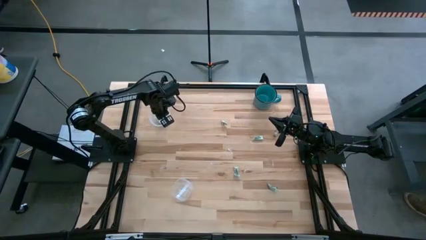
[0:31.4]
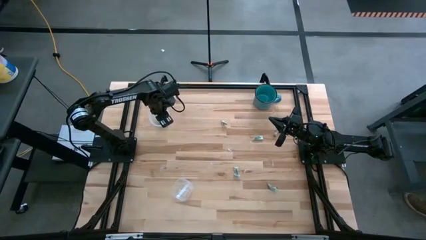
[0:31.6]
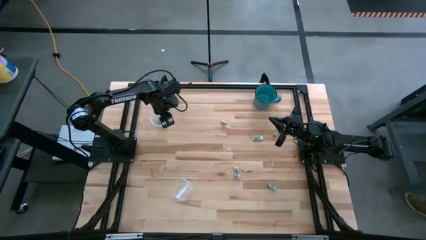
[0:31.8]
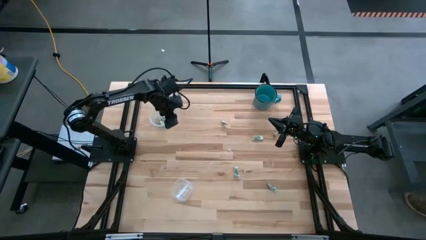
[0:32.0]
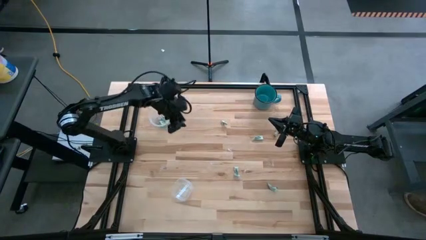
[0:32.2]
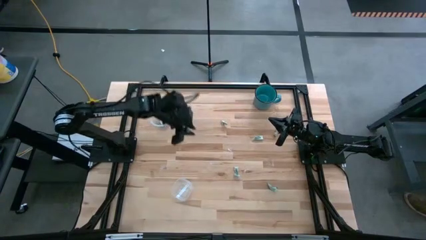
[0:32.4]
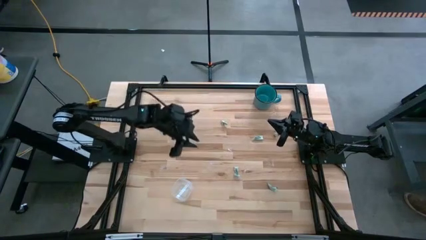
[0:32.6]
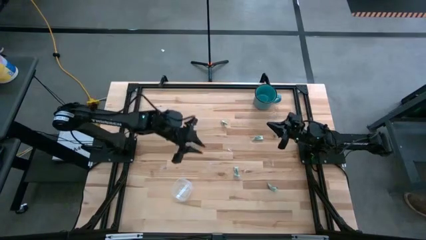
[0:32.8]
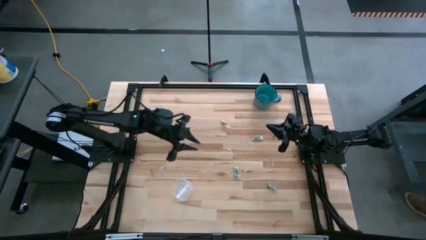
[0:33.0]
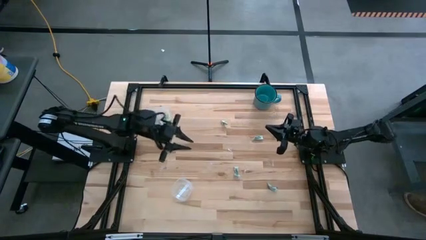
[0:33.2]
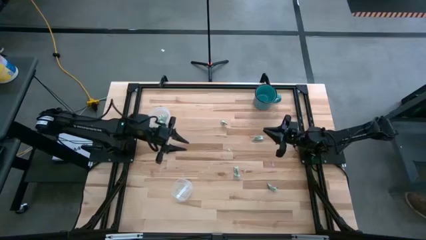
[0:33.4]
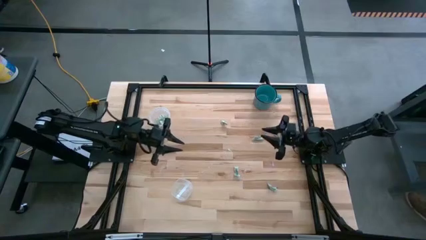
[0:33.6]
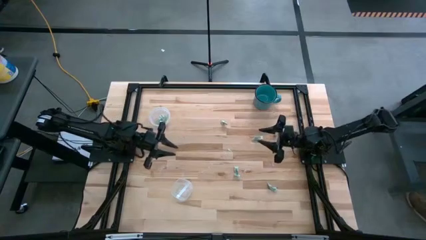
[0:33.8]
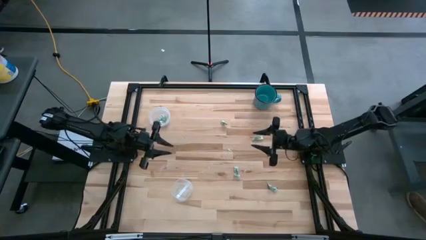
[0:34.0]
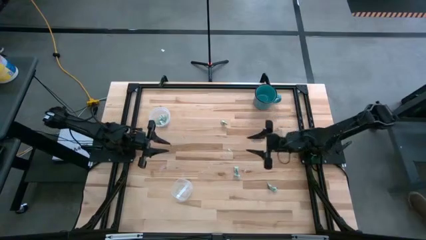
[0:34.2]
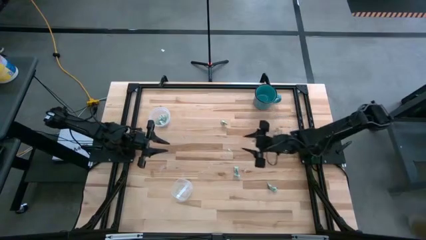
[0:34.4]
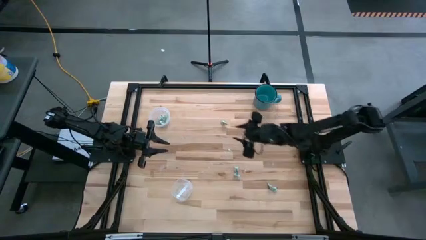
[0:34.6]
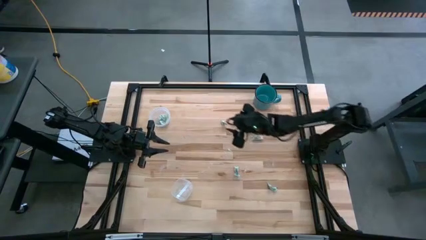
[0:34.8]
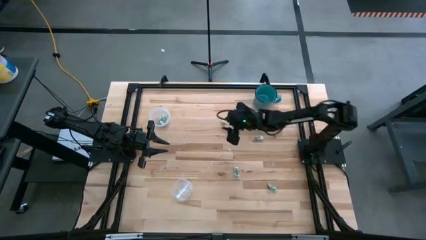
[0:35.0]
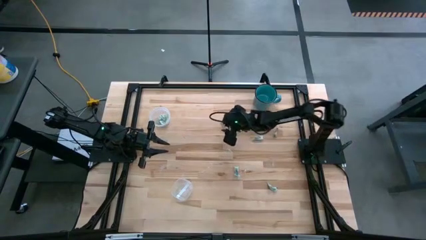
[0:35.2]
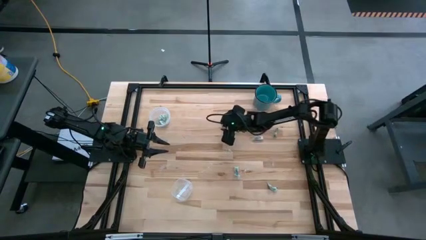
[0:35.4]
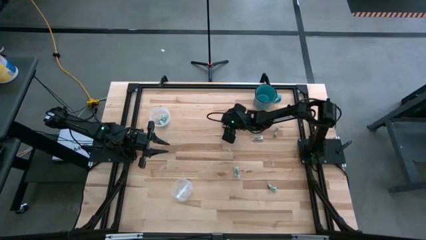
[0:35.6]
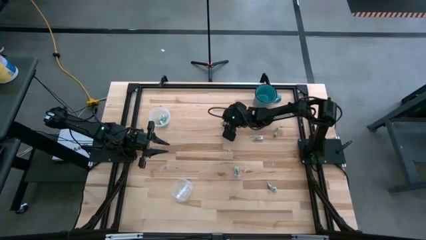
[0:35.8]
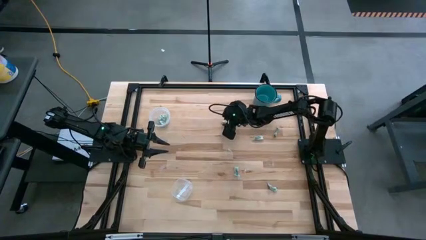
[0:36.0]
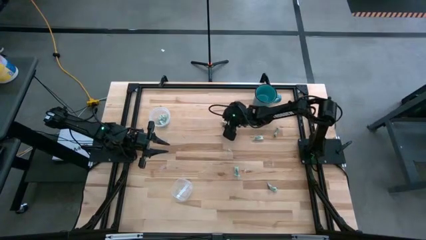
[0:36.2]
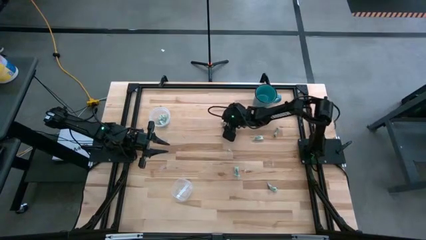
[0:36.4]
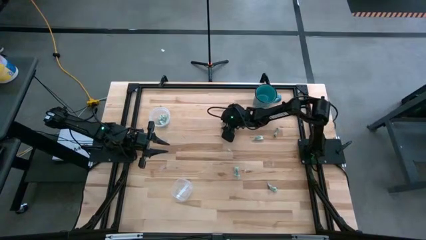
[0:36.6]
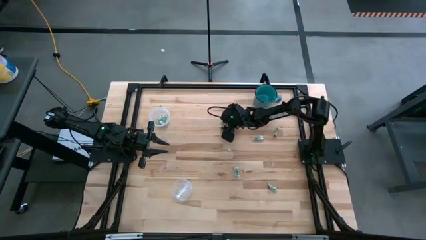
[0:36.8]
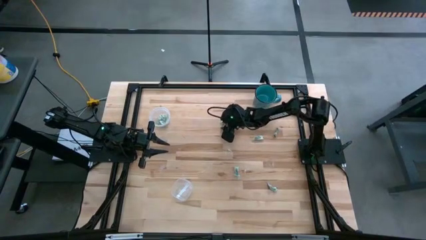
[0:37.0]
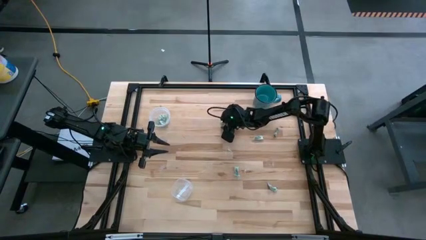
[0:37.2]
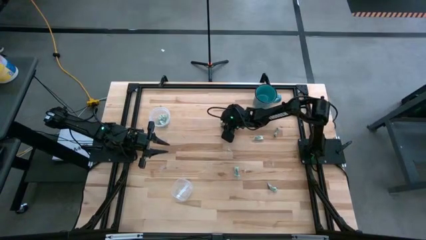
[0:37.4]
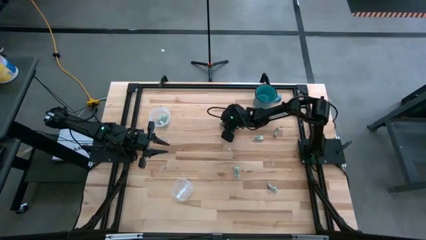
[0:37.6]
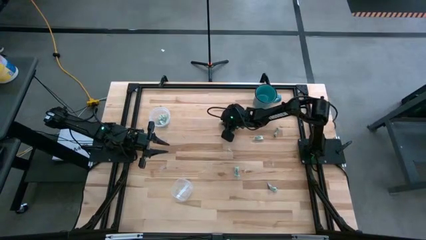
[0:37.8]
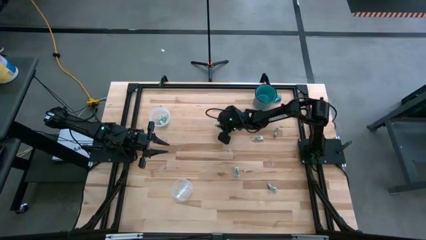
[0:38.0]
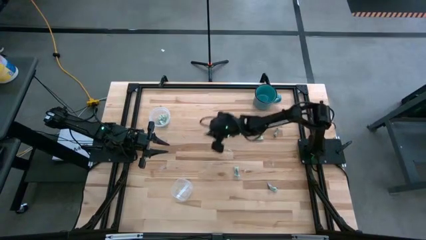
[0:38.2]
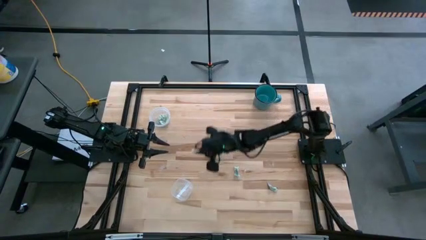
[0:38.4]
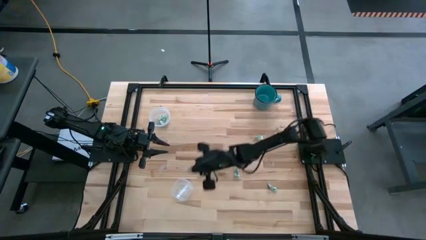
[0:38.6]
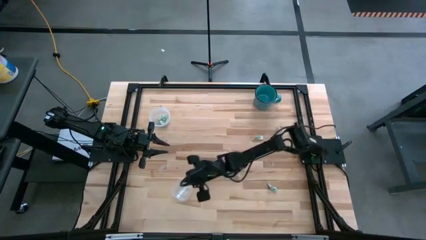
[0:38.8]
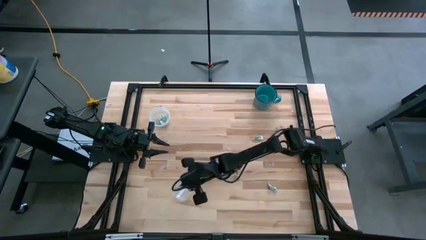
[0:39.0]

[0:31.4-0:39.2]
Task: Pick and place Stevia / Truvia into bins
Put the stevia packet into the bottom transparent container

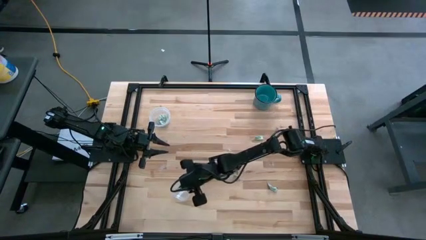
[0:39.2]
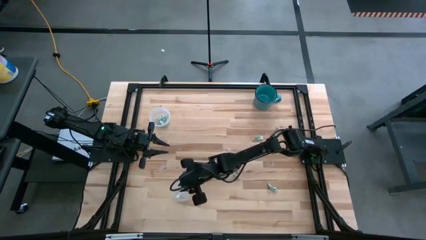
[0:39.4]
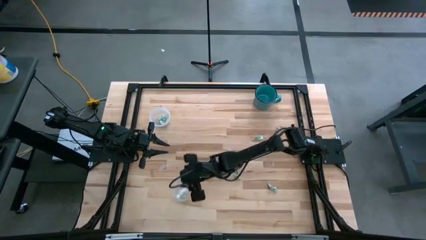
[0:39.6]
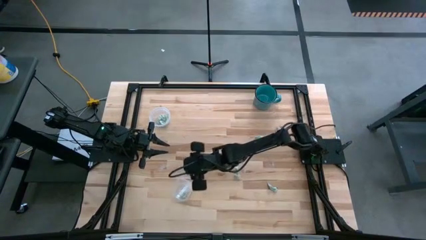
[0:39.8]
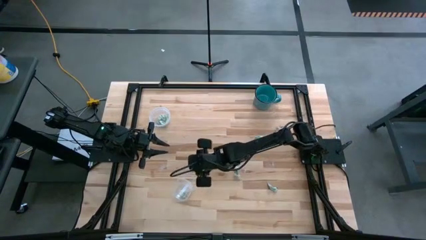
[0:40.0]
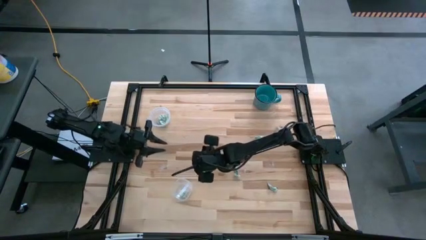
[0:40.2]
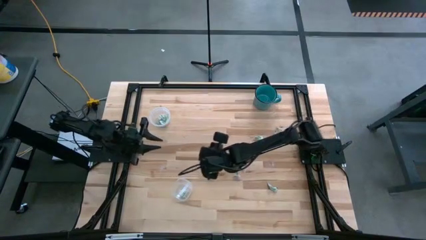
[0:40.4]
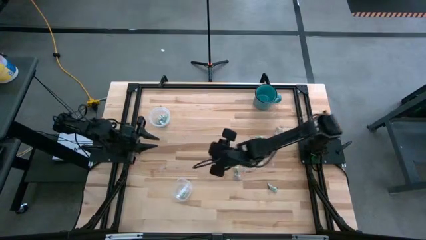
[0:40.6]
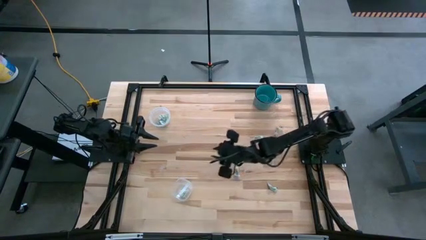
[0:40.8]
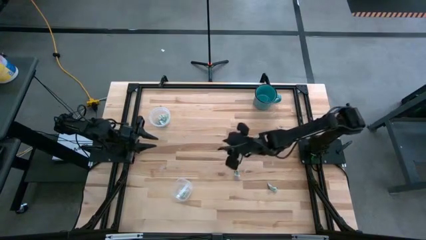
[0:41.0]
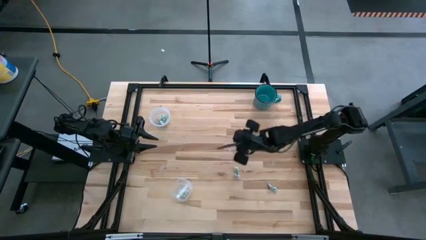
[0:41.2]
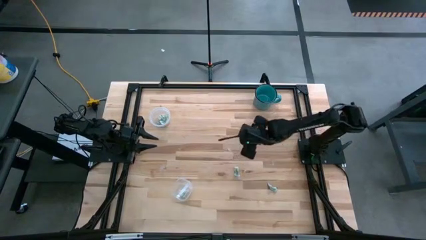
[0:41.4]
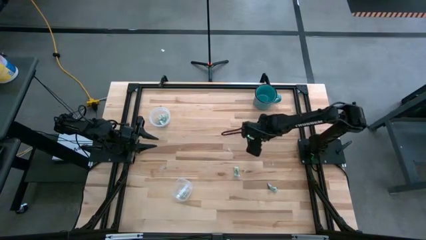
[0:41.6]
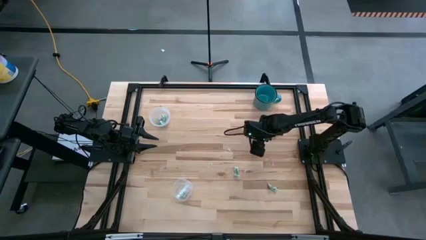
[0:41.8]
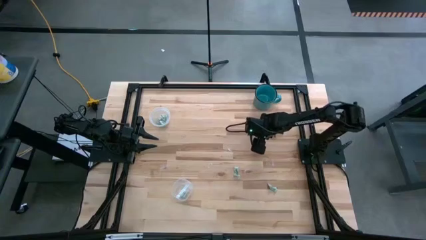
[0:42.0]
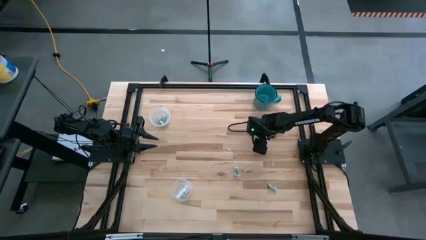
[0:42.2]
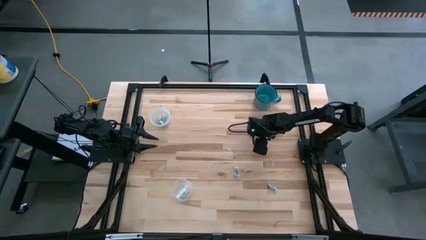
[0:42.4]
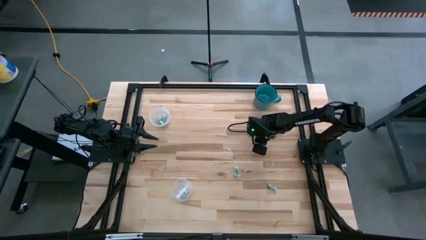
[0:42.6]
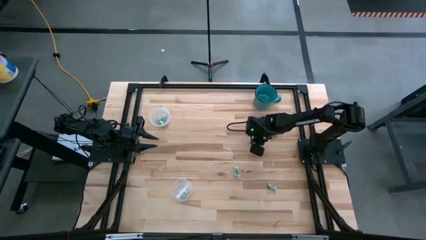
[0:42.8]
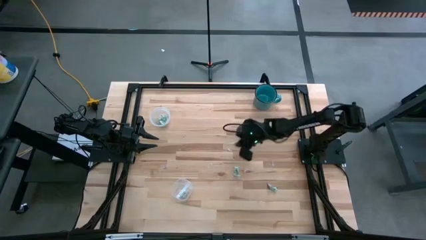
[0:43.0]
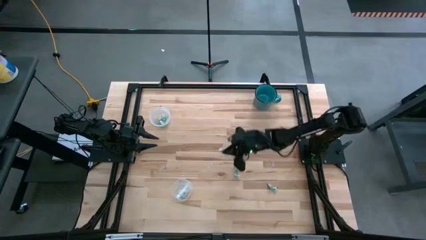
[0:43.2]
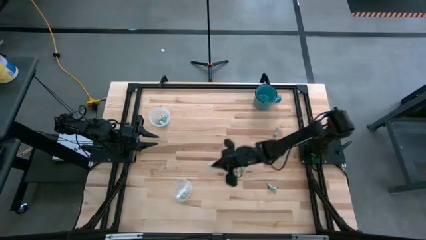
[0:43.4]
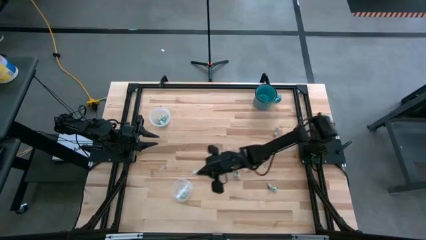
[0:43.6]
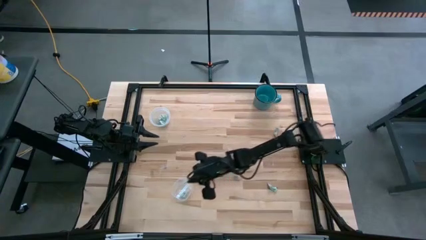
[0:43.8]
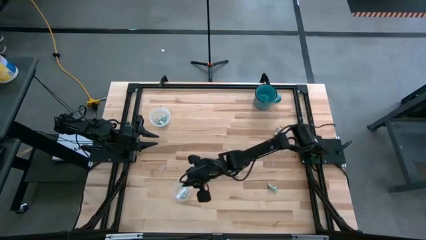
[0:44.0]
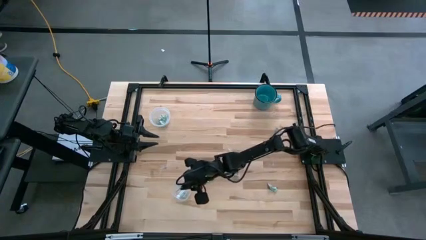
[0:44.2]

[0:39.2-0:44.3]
Put the stevia packet into the bottom transparent container

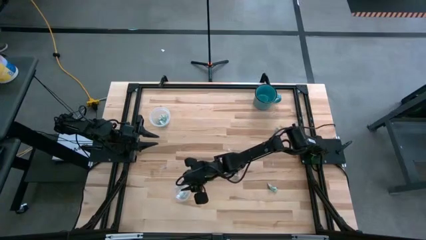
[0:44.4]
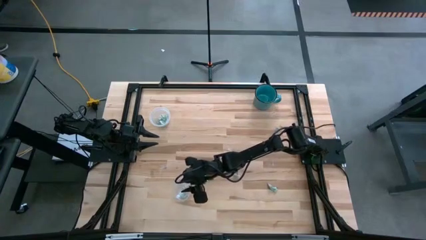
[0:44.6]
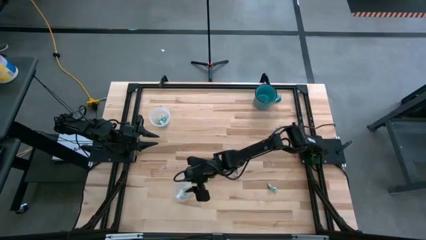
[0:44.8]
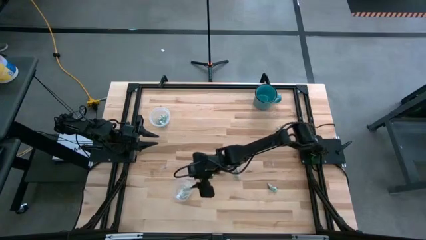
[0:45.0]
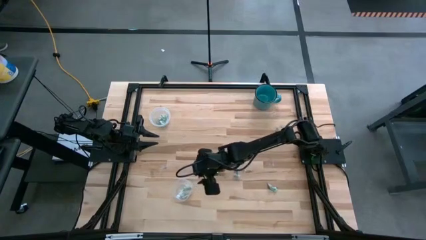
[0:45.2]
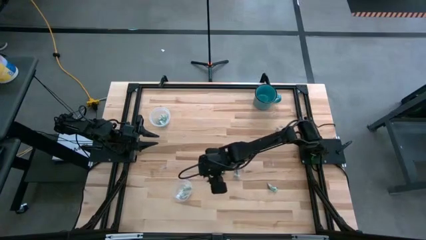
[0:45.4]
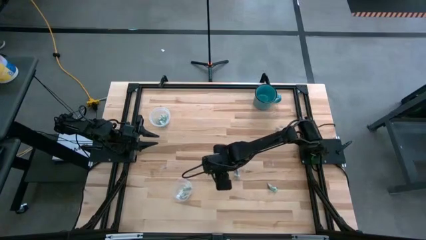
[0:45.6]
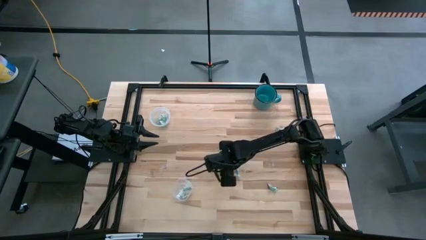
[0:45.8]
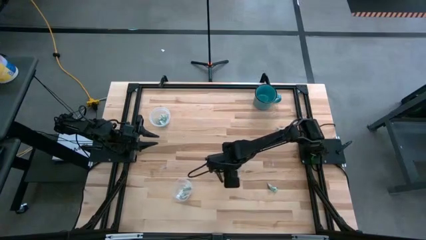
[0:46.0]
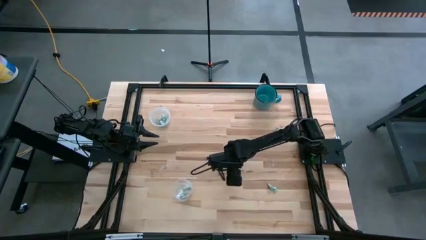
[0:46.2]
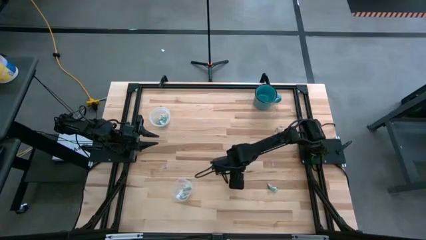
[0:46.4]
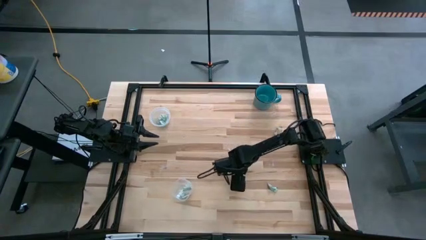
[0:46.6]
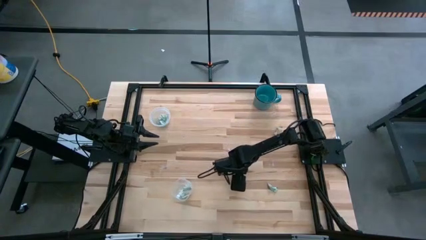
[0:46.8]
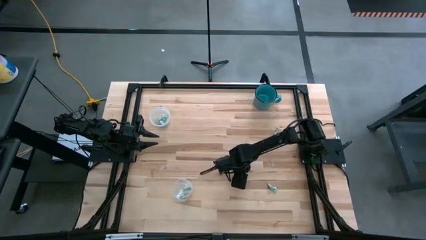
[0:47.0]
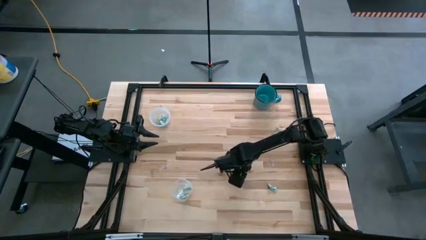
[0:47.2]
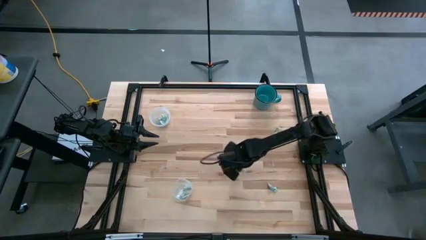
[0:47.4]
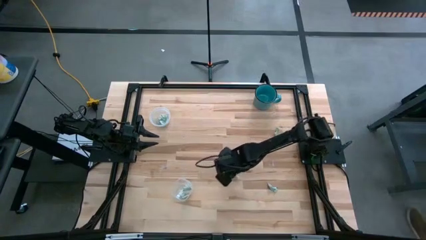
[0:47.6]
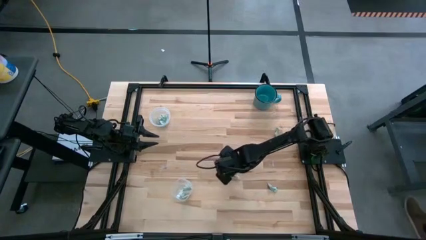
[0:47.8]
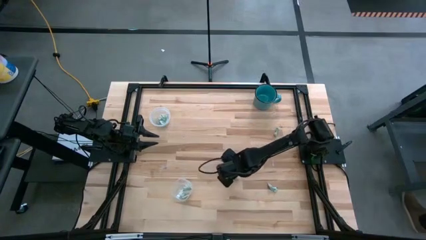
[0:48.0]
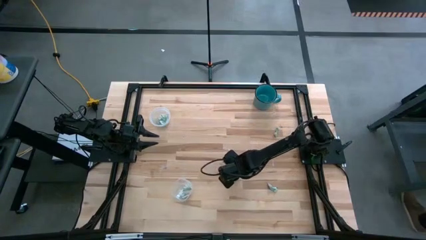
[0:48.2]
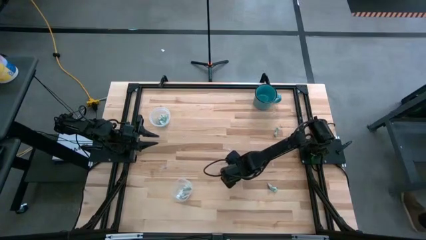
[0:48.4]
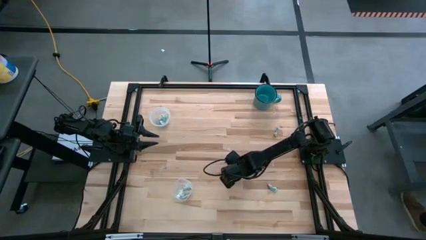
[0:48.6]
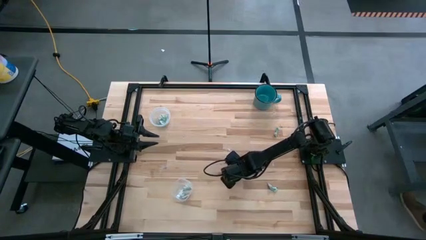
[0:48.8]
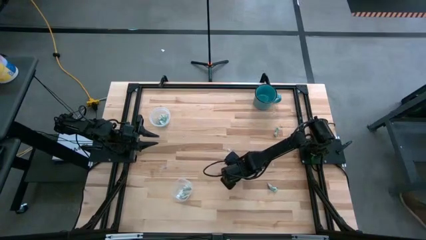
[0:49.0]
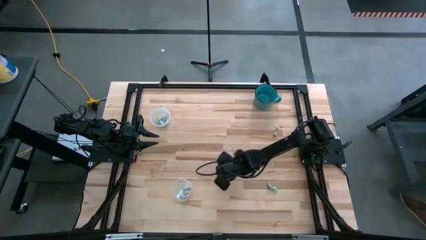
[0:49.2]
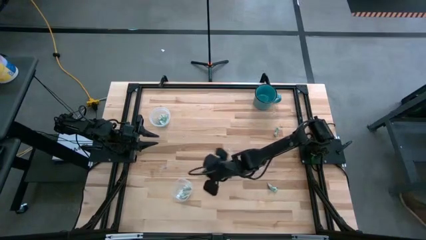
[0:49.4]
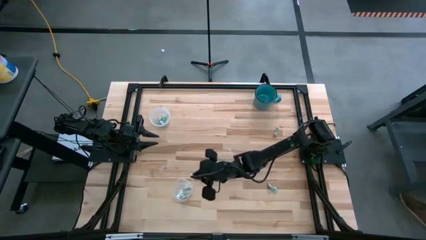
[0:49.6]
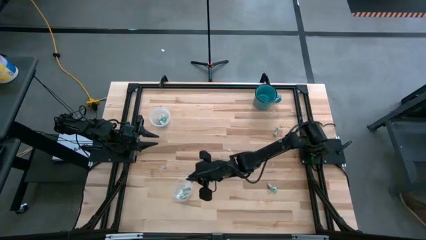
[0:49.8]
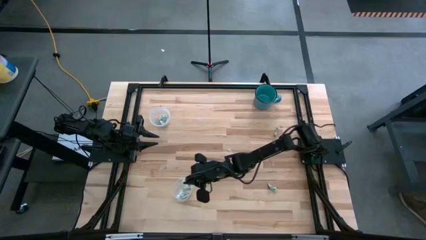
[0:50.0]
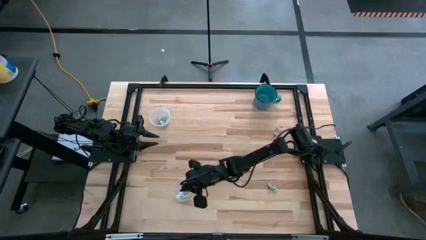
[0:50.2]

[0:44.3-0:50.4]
Put the stevia packet into the bottom transparent container
